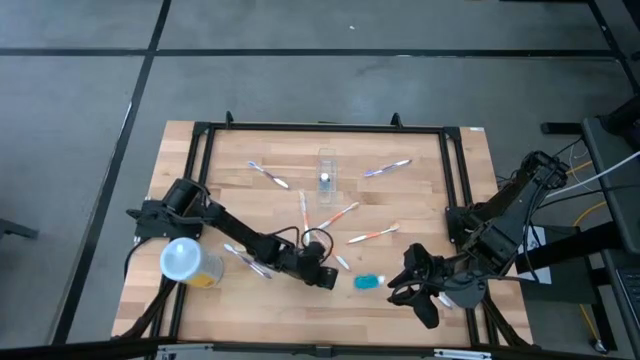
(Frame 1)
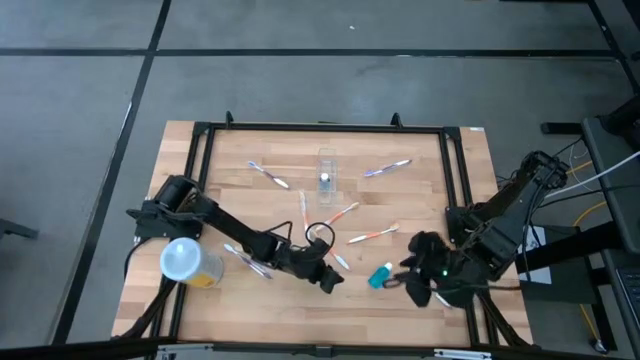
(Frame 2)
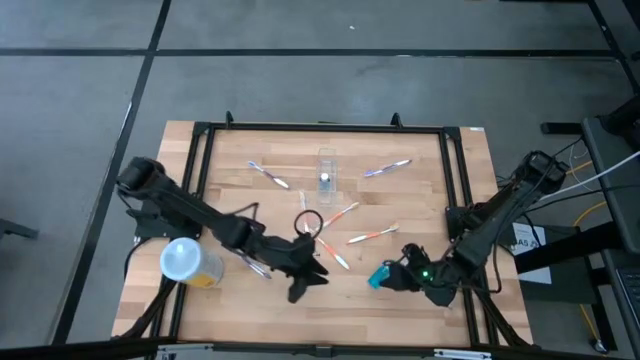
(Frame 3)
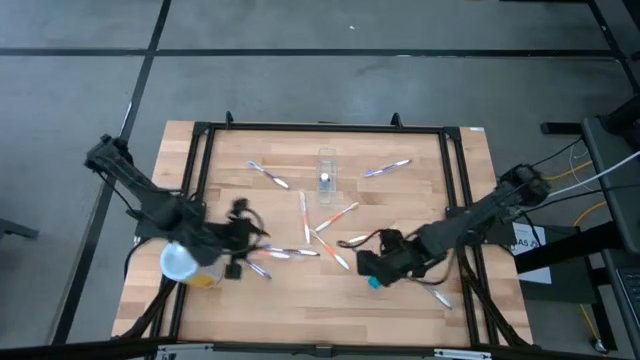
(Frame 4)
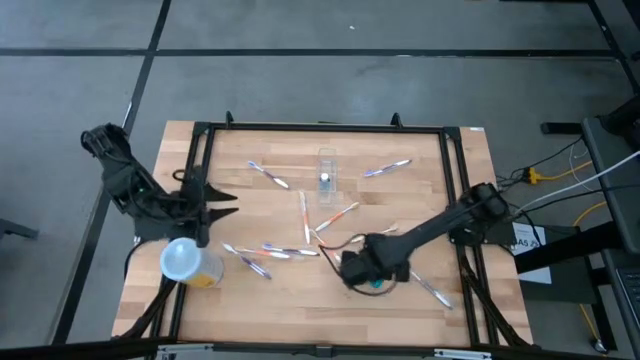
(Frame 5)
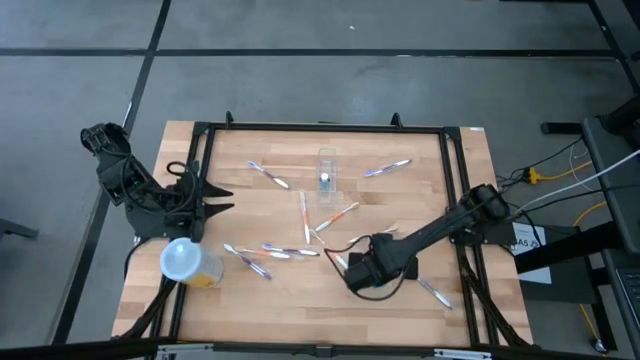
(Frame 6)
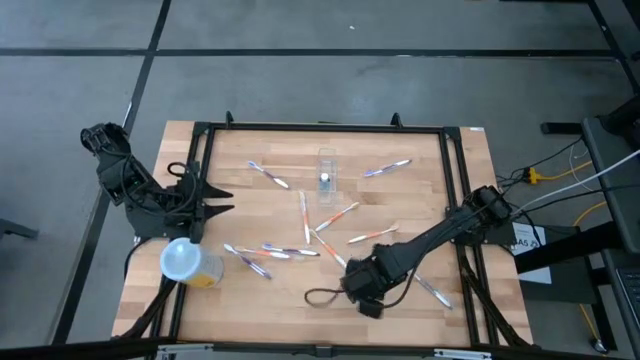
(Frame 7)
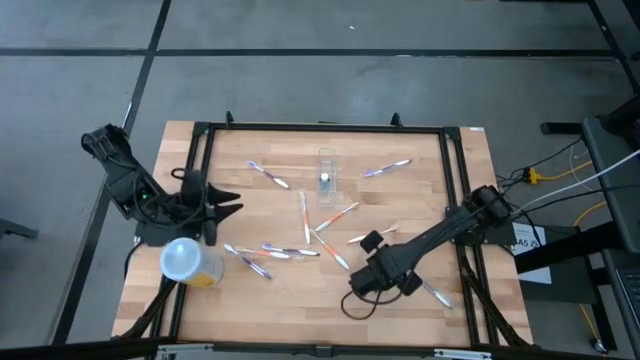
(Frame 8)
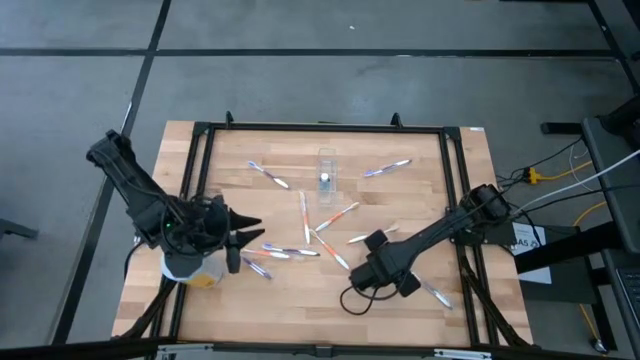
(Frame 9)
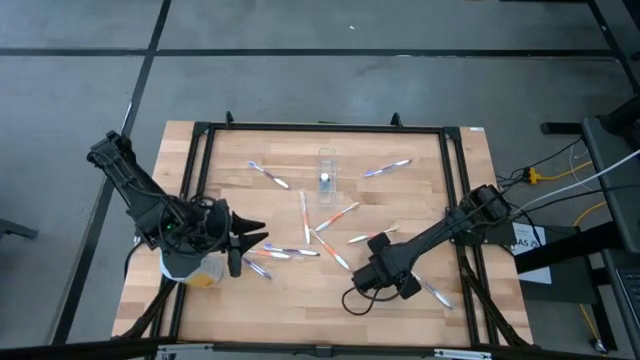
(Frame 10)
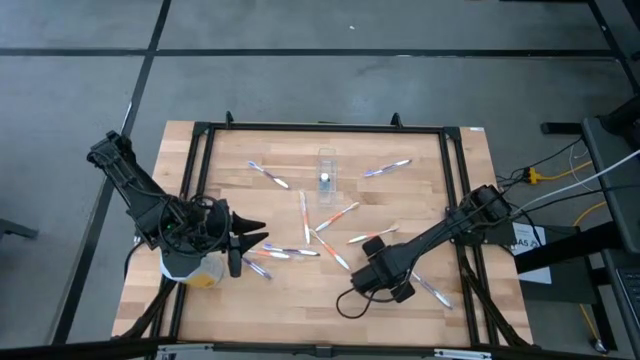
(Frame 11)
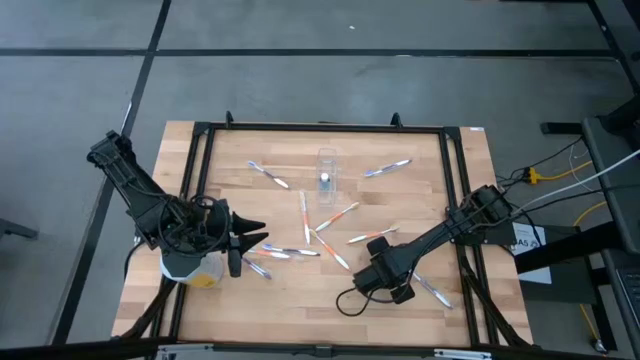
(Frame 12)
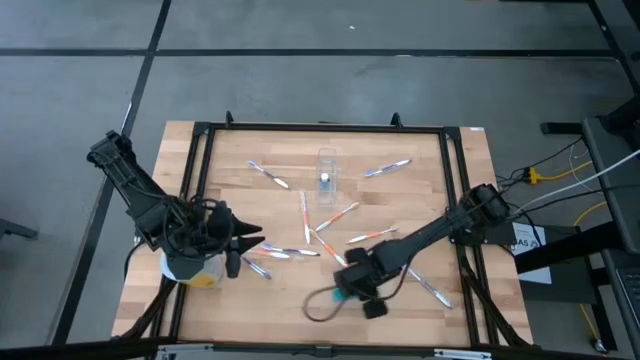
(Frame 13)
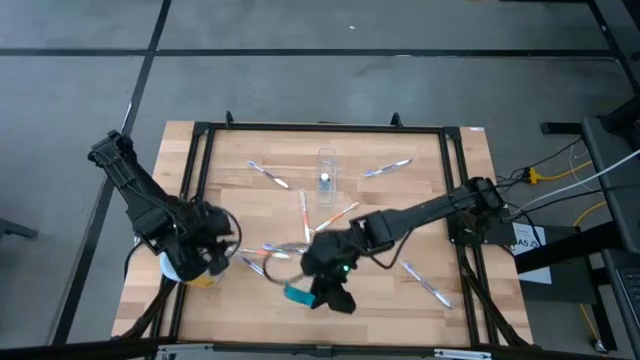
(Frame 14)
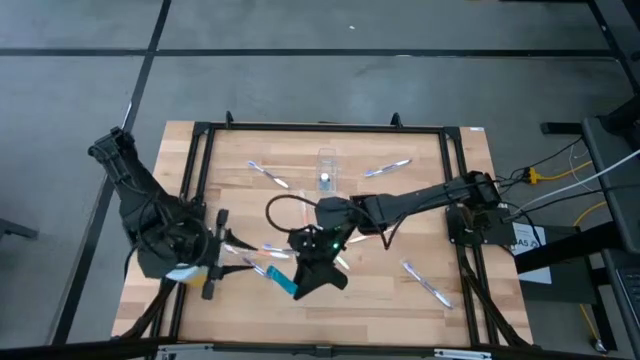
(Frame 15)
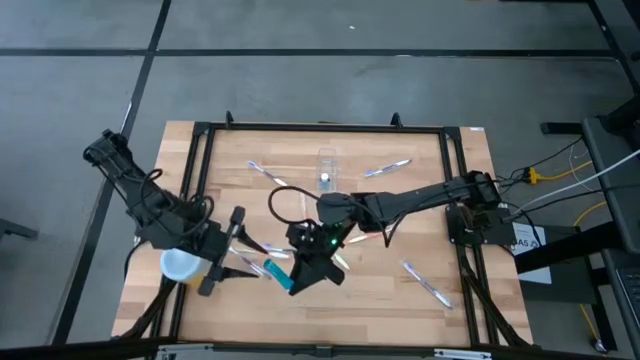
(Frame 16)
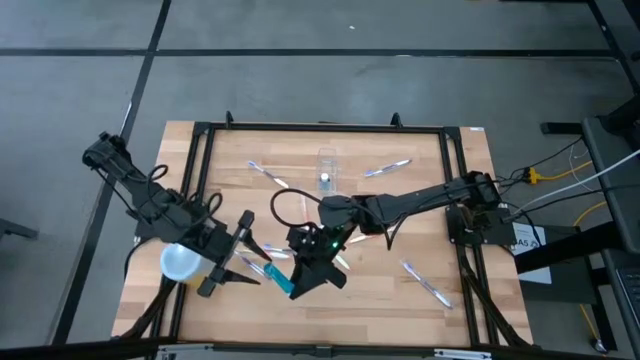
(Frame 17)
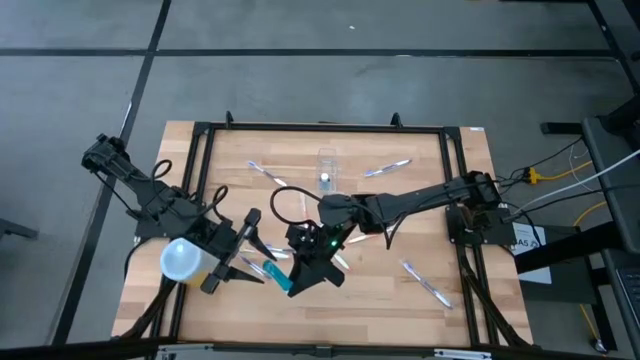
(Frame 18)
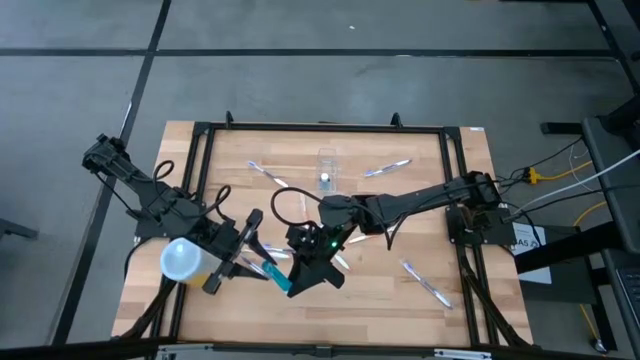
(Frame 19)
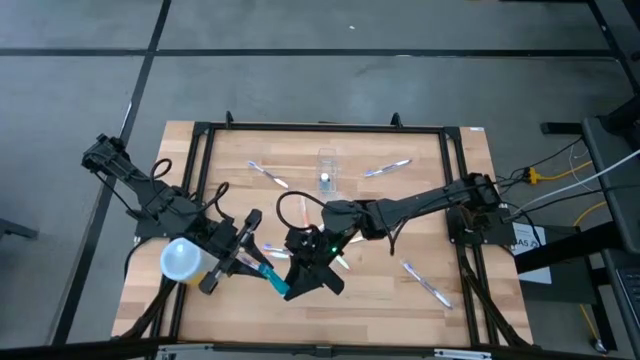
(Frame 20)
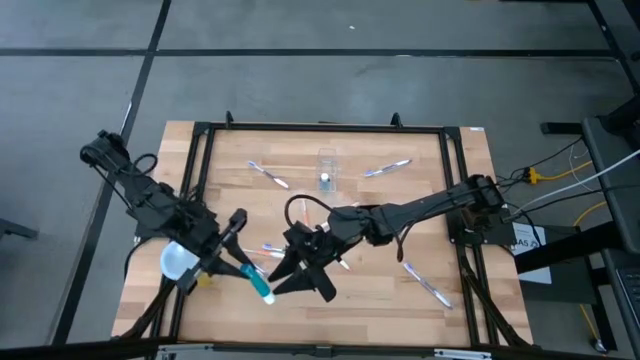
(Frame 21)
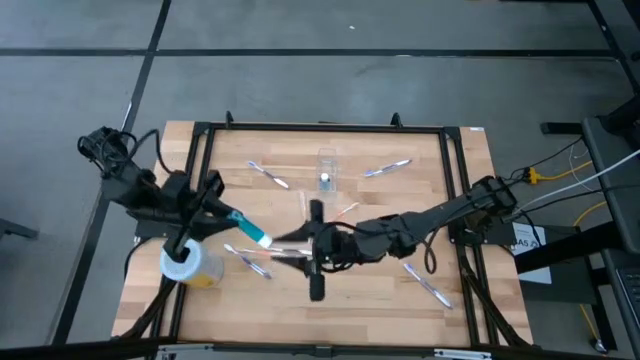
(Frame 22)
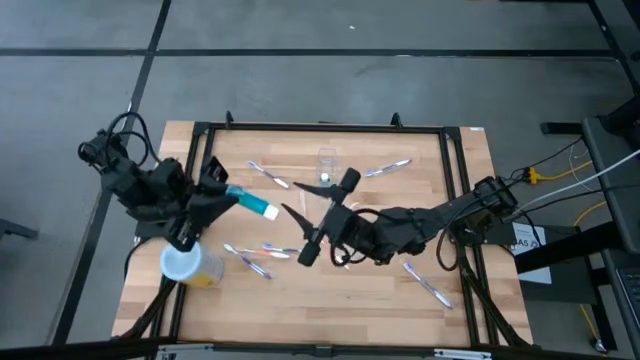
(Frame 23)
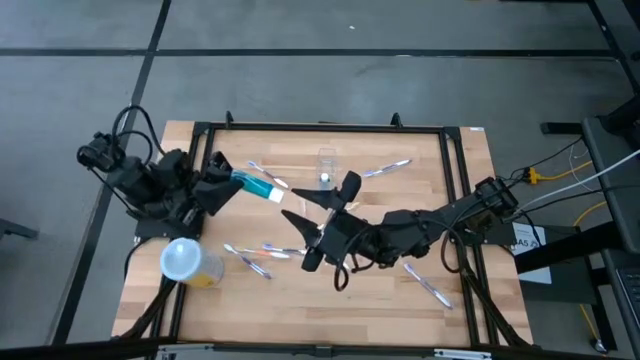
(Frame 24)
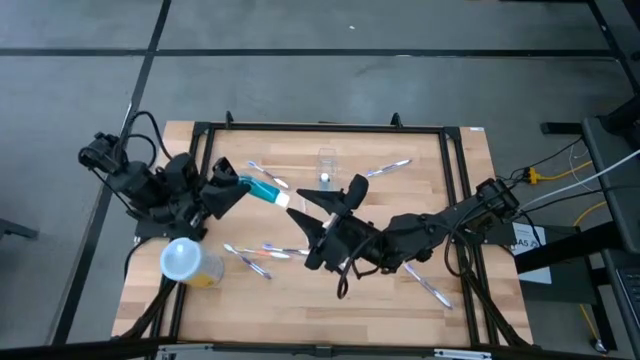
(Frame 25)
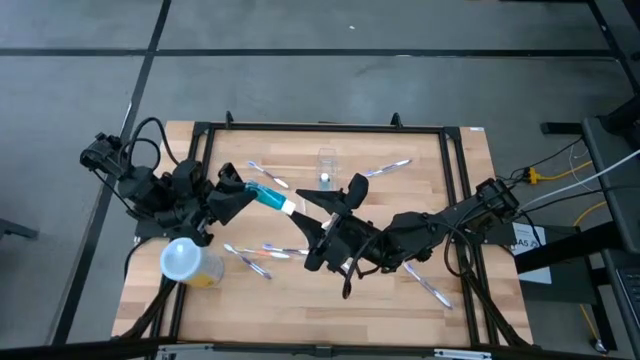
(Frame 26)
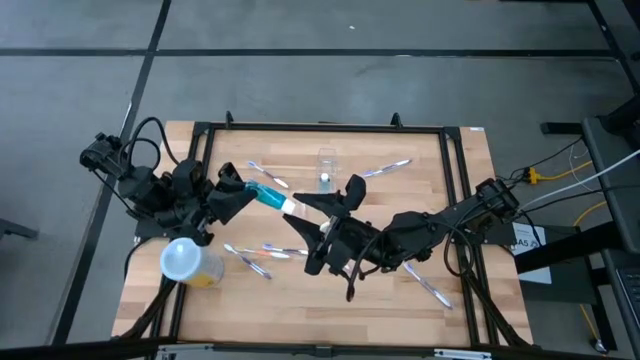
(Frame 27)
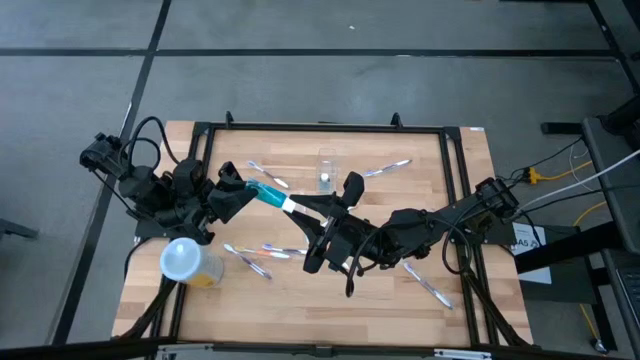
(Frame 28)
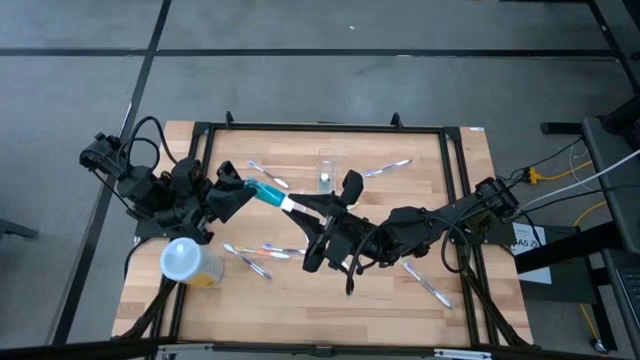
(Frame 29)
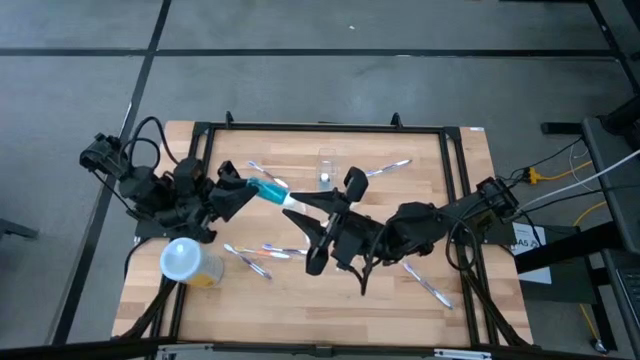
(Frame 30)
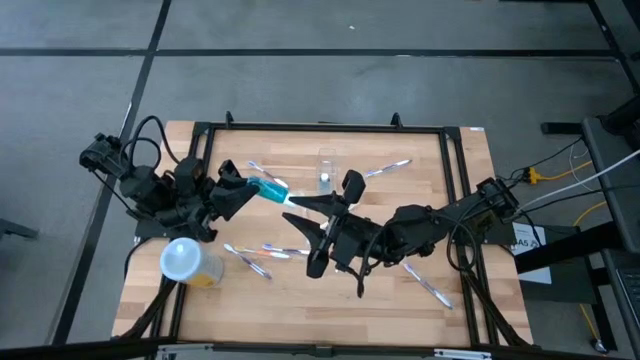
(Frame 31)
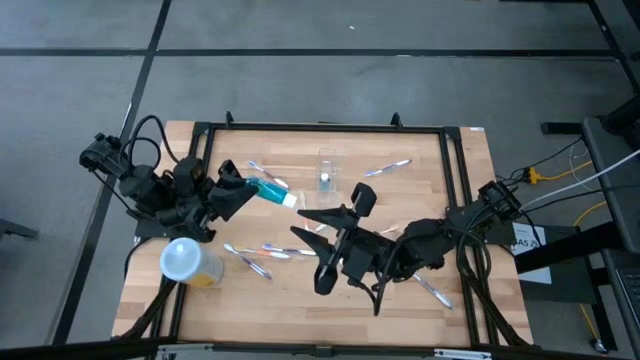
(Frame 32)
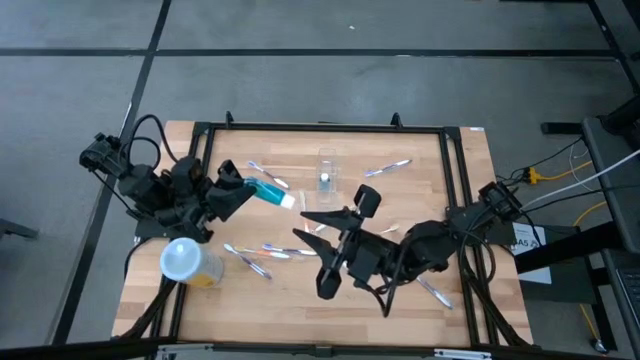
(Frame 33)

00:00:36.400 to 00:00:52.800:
Task: Pick & Place toothbrushing station
Put the blue mouthwash into the transparent organizer

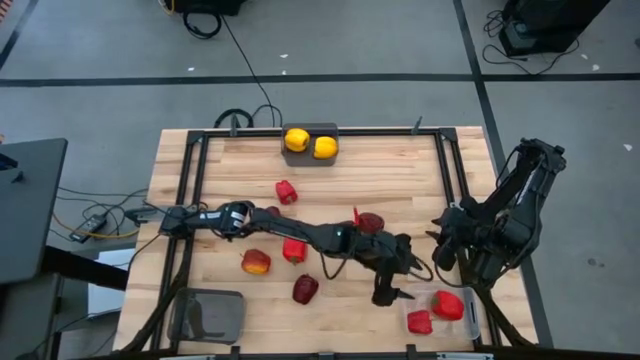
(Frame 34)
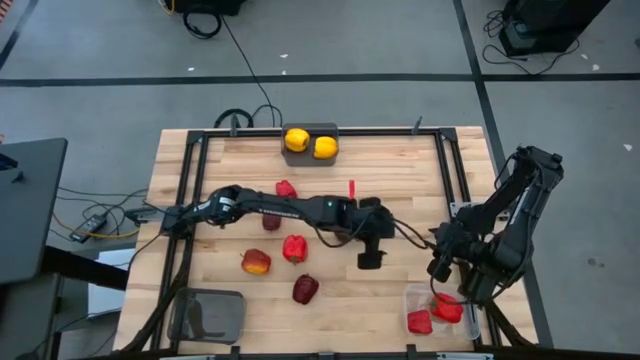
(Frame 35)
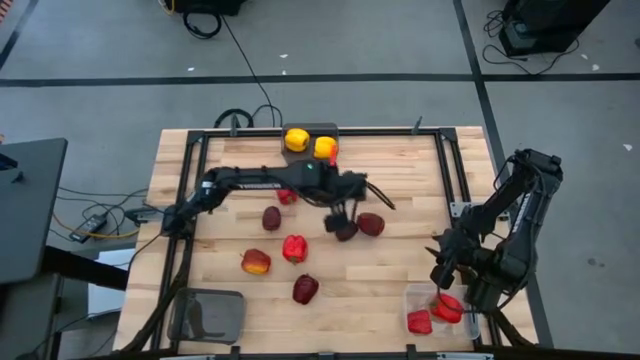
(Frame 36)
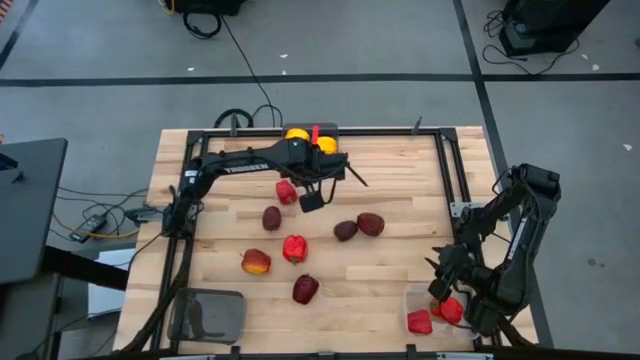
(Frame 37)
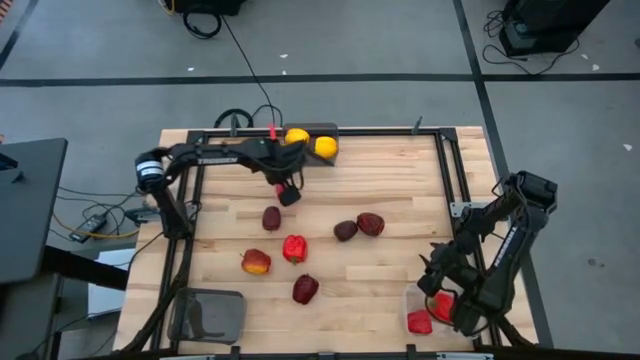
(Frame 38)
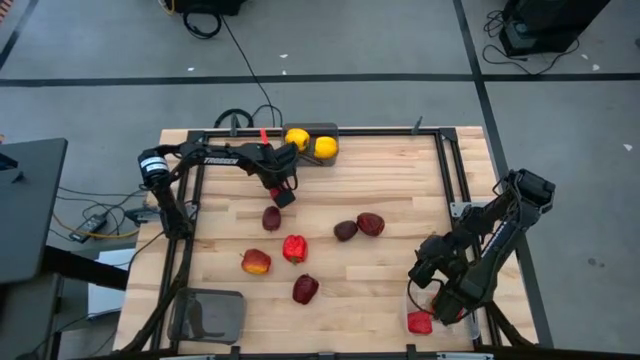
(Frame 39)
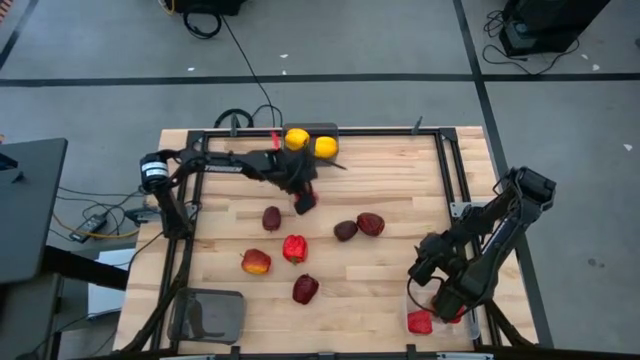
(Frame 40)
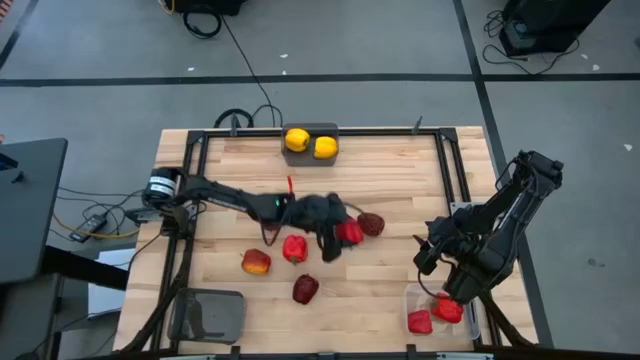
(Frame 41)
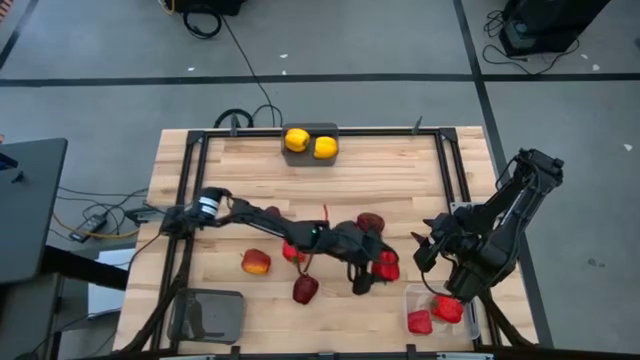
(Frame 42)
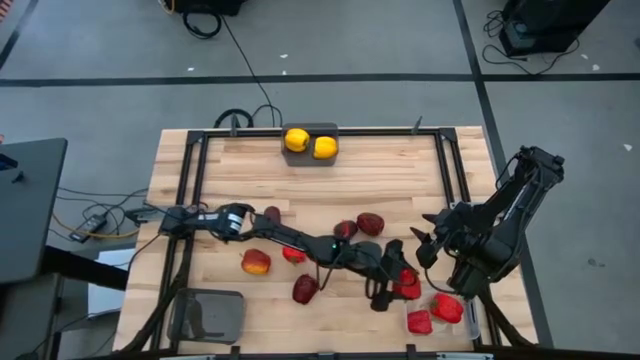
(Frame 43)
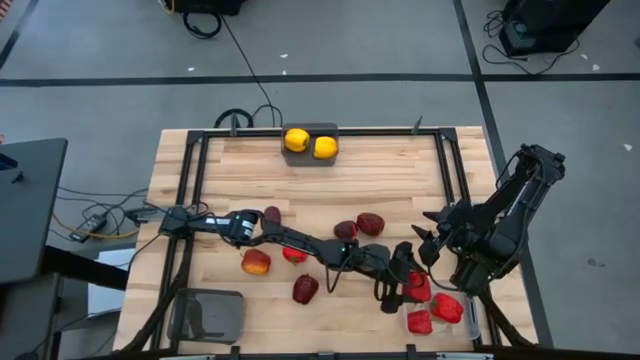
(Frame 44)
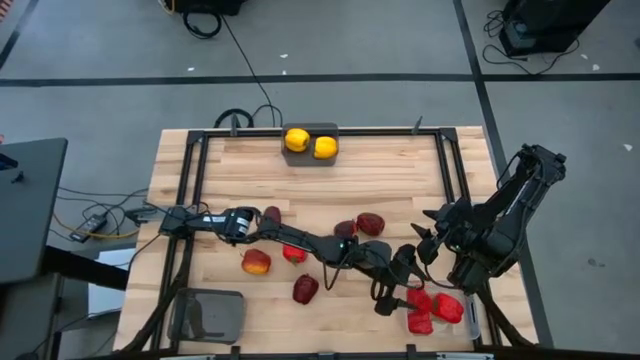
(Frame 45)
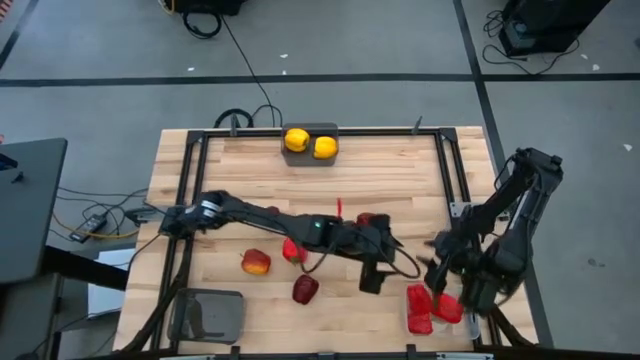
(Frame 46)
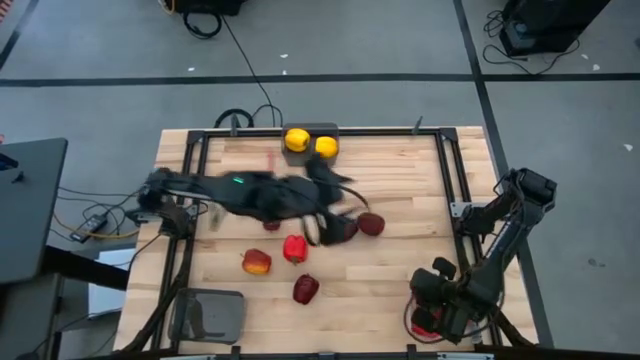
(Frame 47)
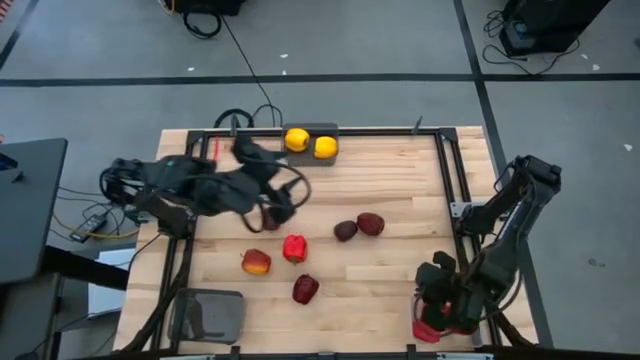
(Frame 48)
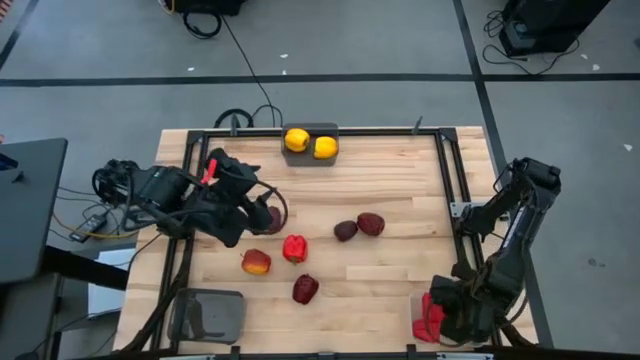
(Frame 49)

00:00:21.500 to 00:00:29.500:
Task: Sort produce into baskets
Put the red bell pepper into the transparent bin
